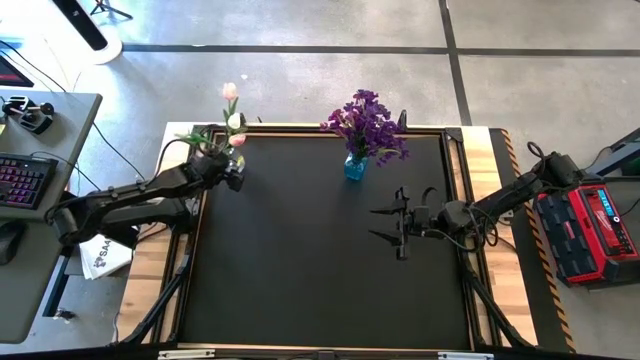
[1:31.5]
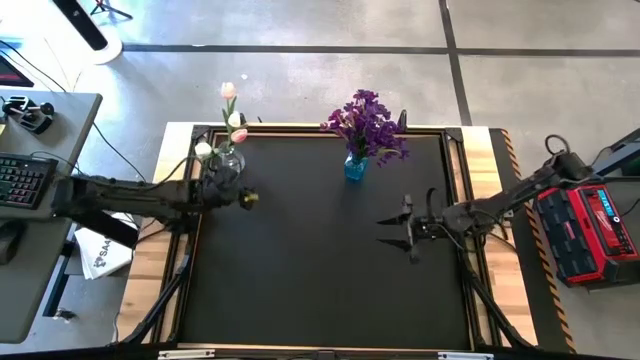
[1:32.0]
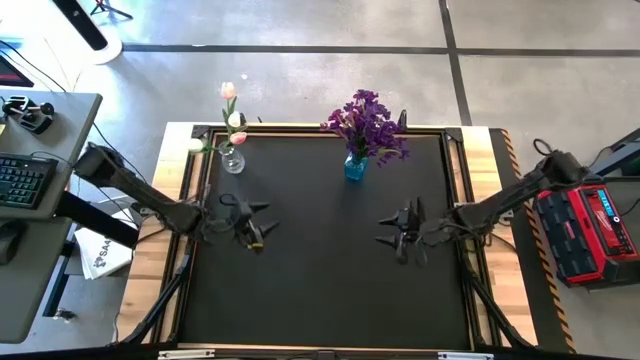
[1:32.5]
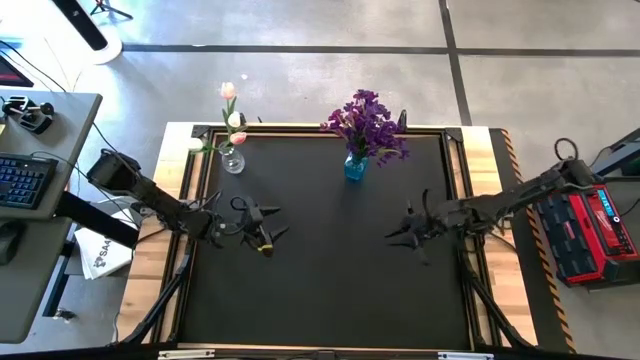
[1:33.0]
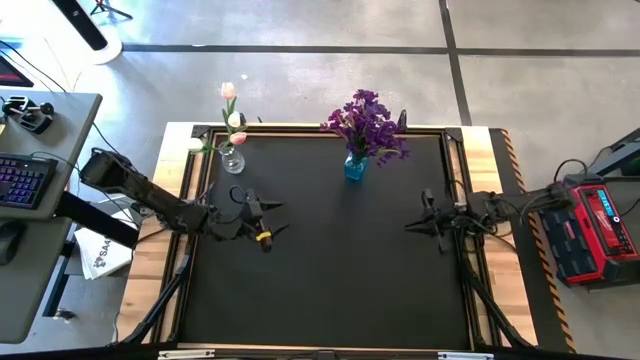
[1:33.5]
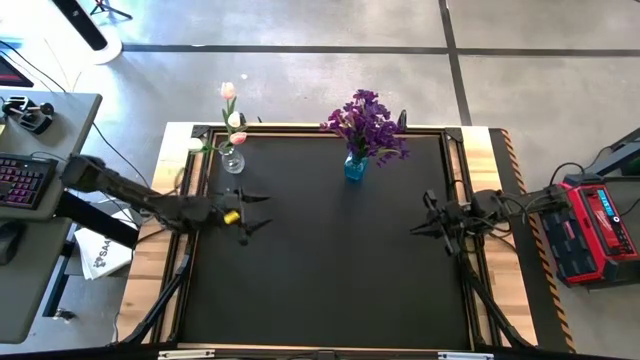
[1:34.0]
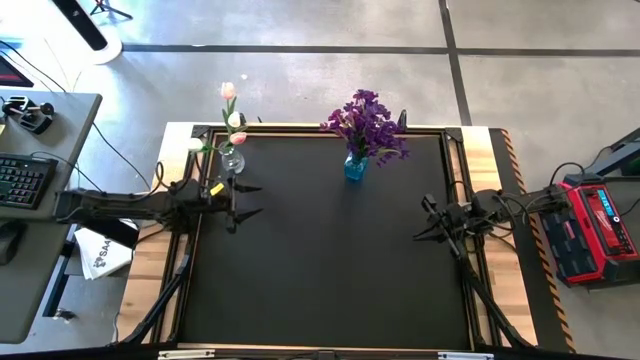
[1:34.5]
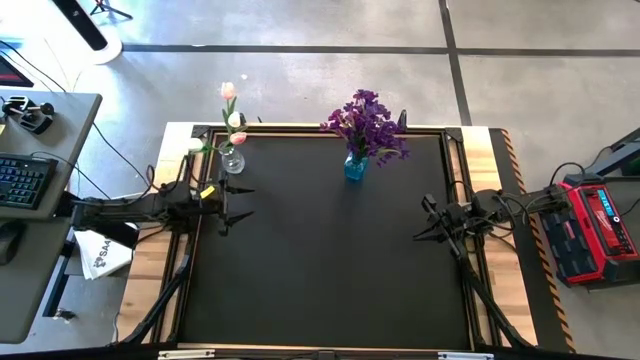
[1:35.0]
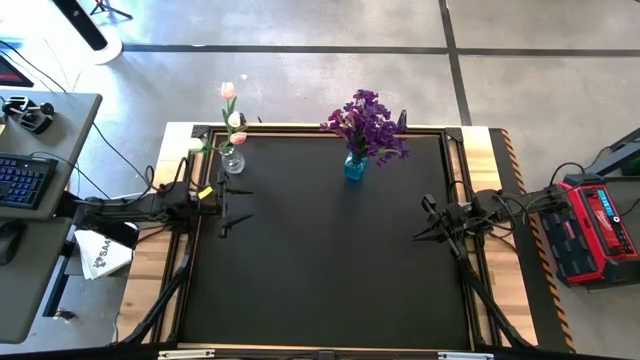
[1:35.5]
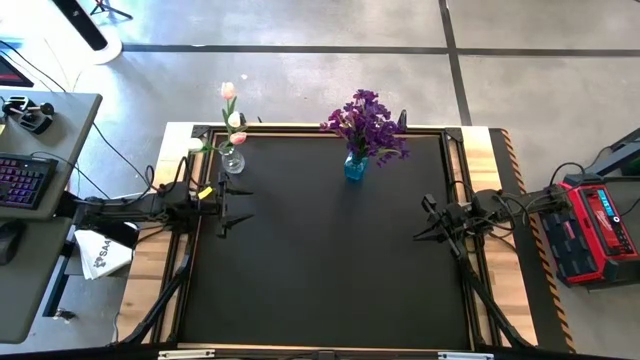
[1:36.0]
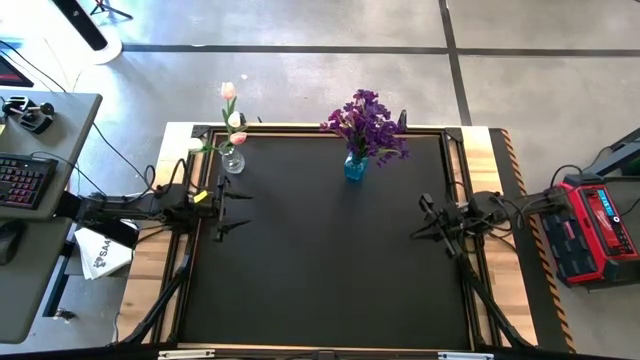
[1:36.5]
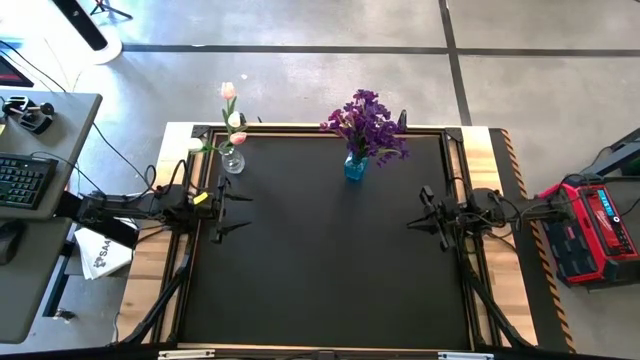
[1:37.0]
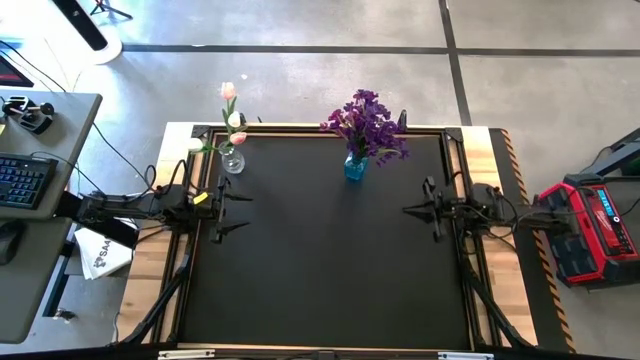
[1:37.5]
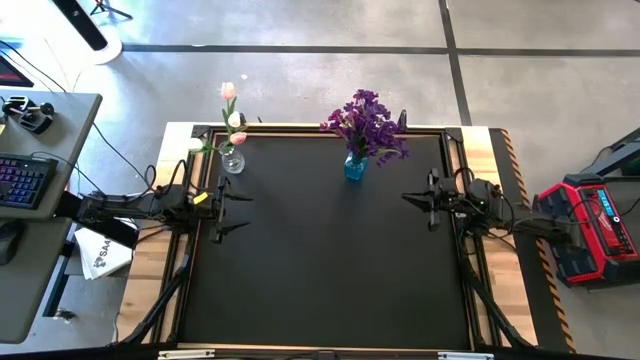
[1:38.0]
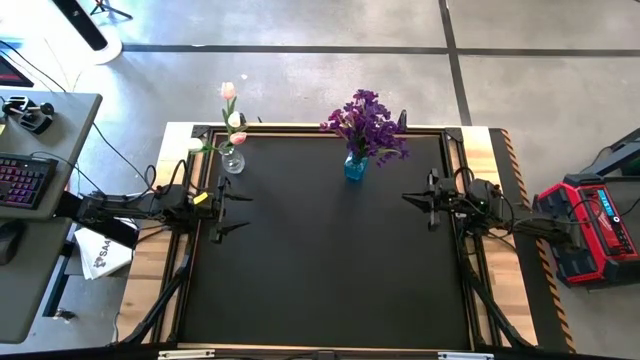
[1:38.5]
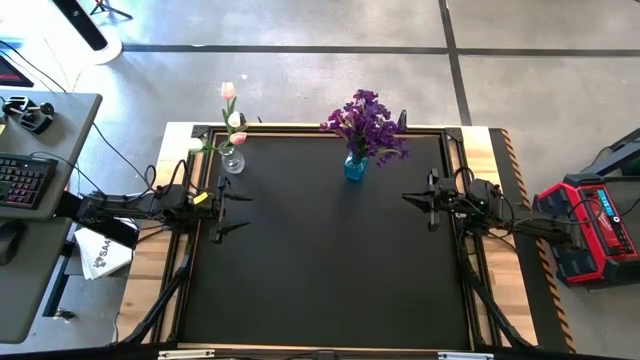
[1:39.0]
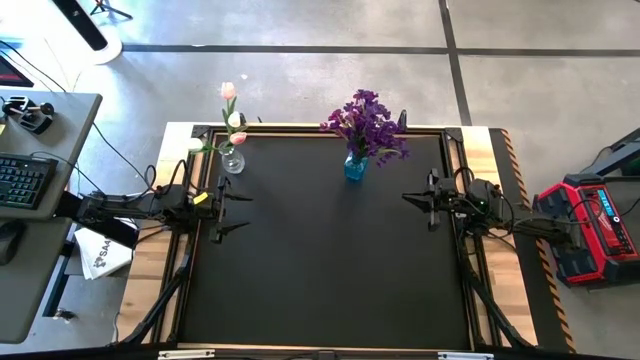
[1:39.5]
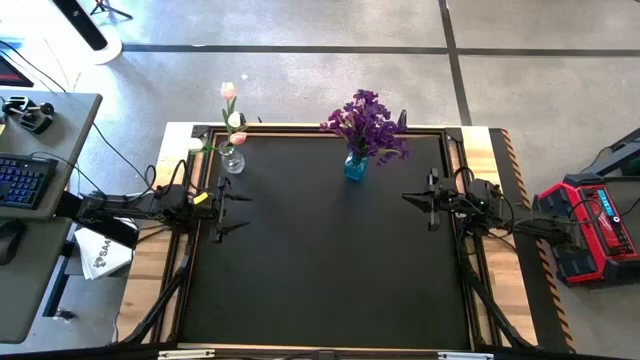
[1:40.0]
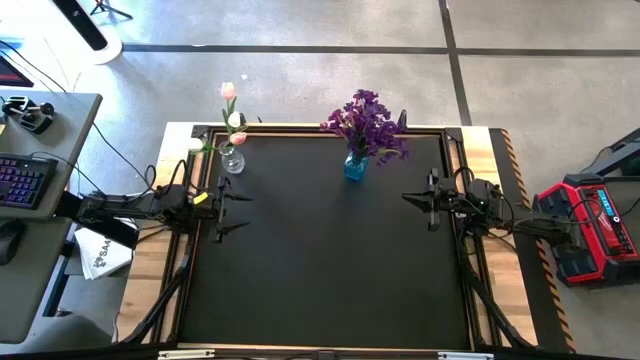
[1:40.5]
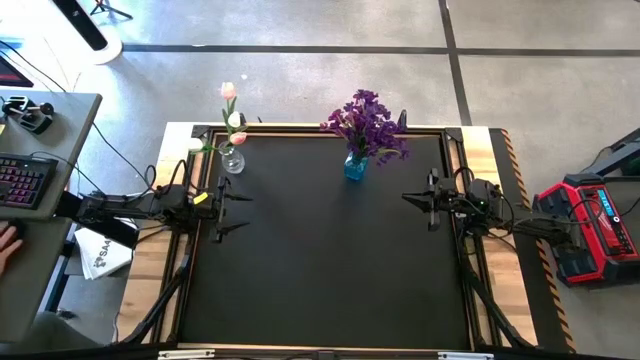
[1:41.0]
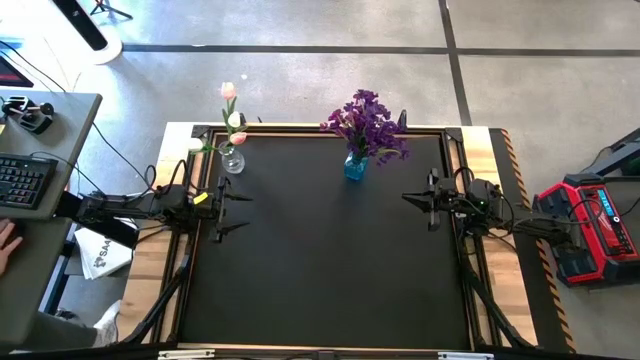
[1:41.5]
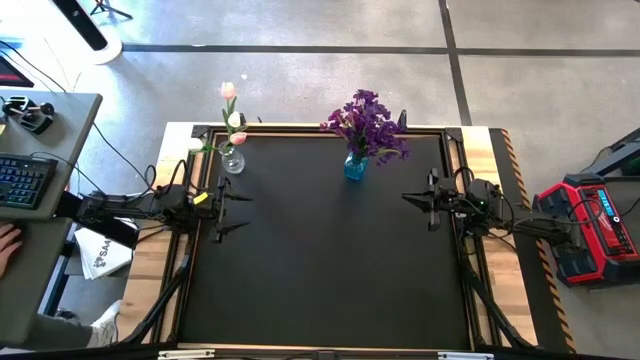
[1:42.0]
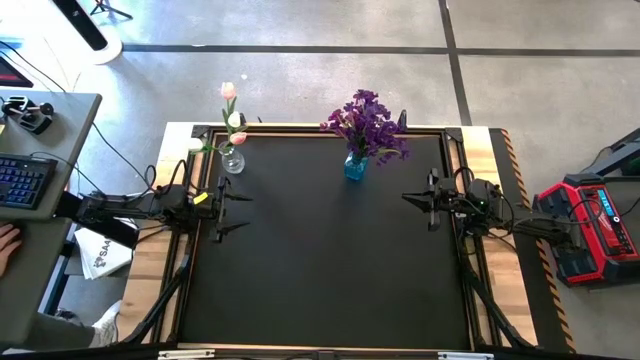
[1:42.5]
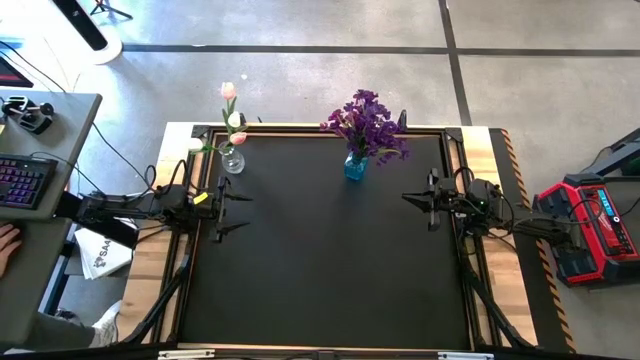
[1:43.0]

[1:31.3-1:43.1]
Task: Sort flowers into vase by color
Return to Home Position

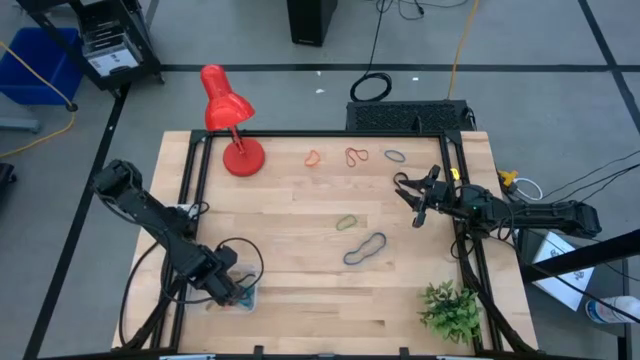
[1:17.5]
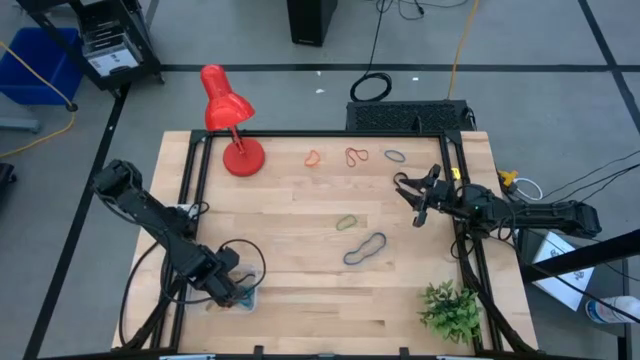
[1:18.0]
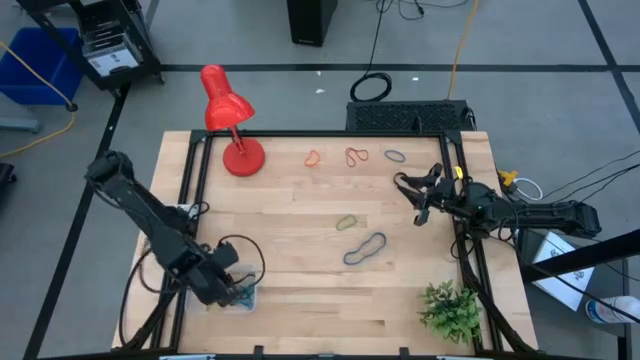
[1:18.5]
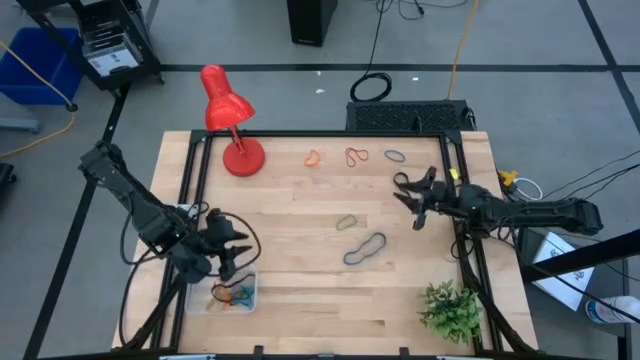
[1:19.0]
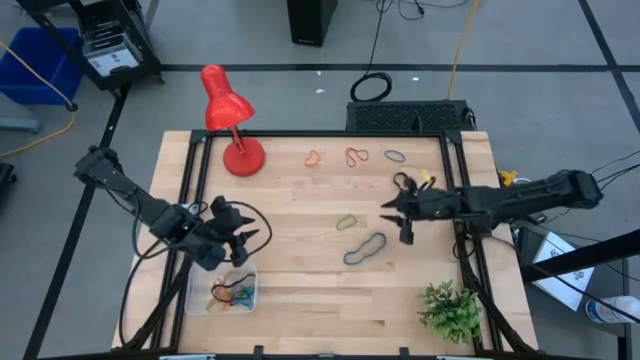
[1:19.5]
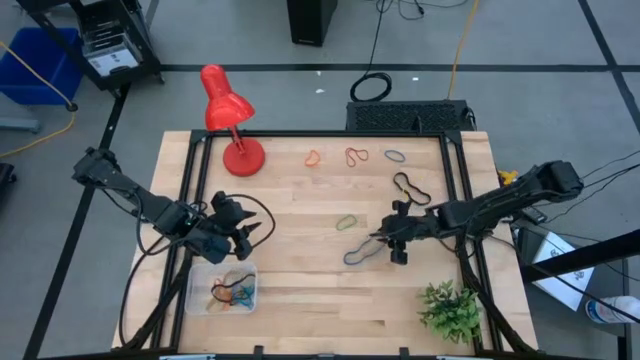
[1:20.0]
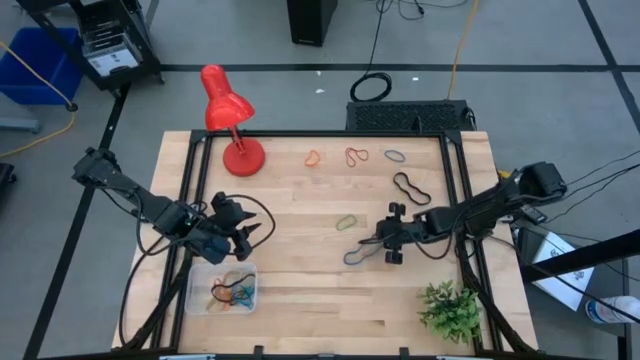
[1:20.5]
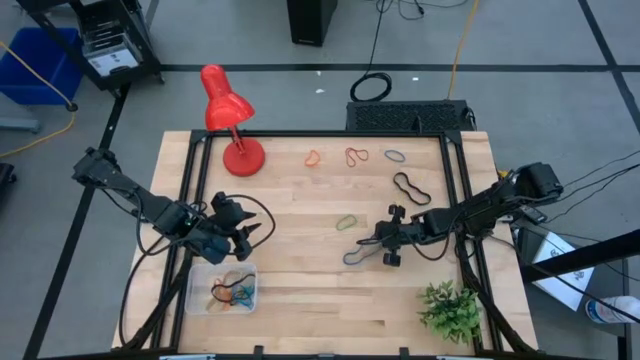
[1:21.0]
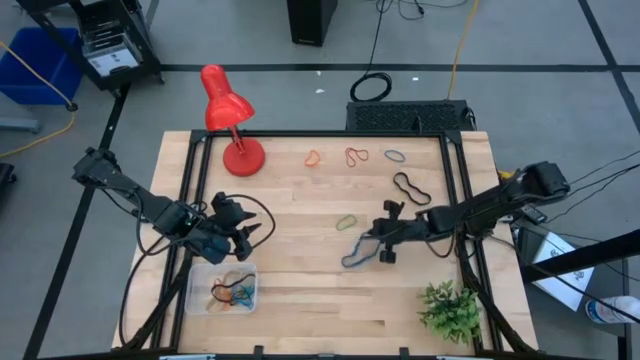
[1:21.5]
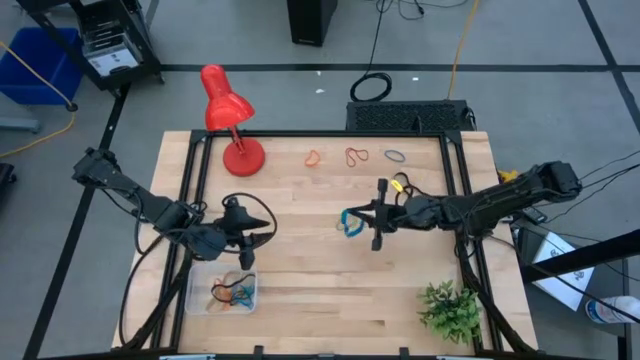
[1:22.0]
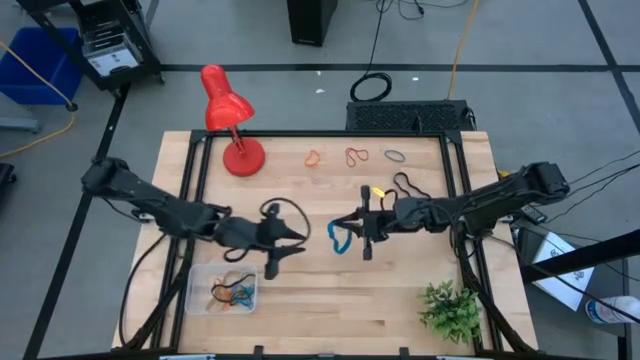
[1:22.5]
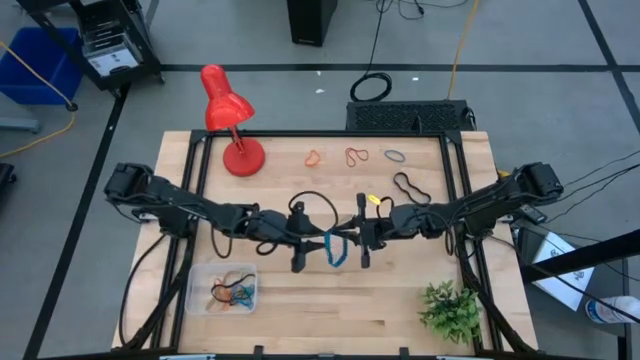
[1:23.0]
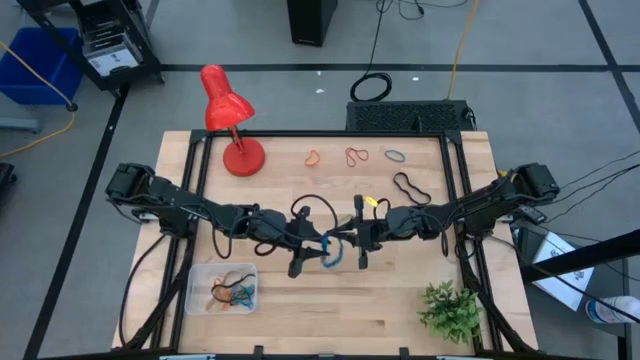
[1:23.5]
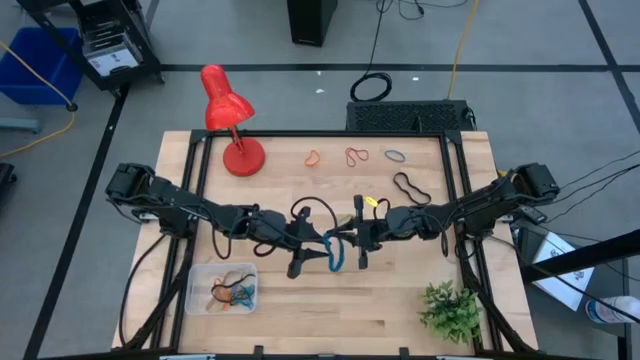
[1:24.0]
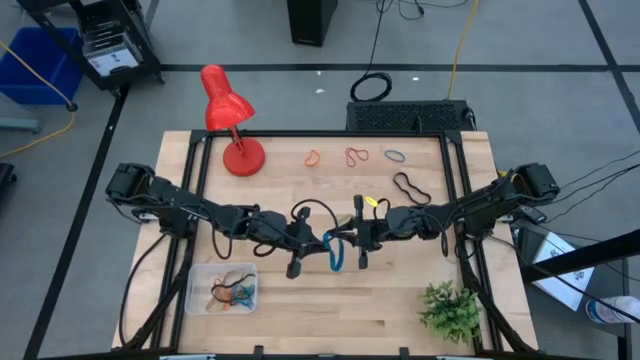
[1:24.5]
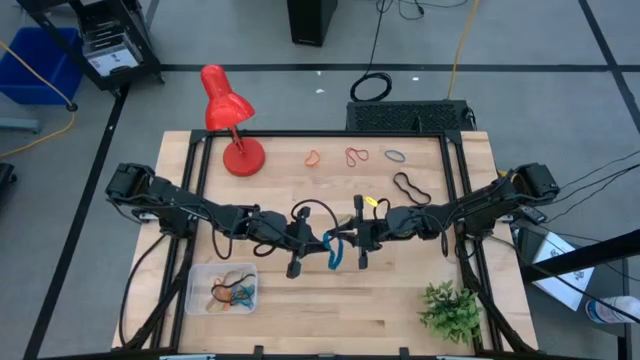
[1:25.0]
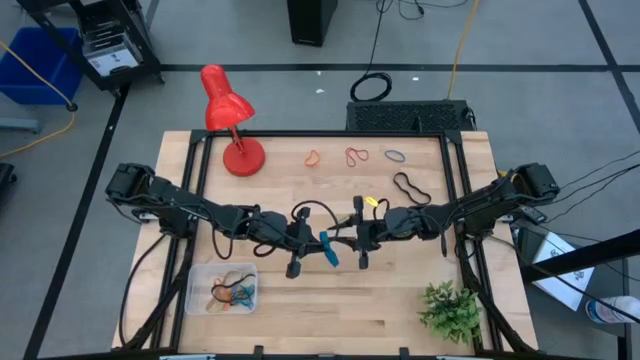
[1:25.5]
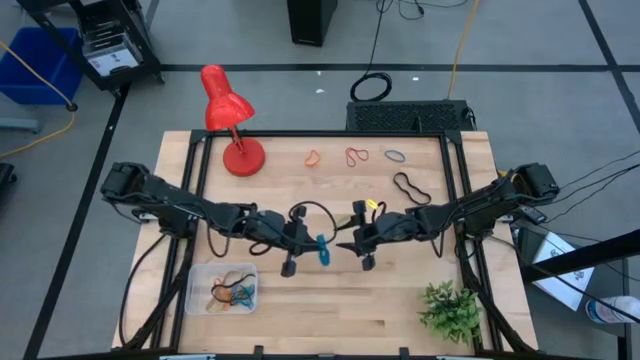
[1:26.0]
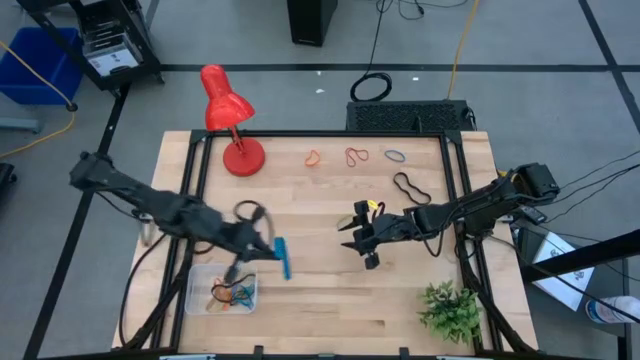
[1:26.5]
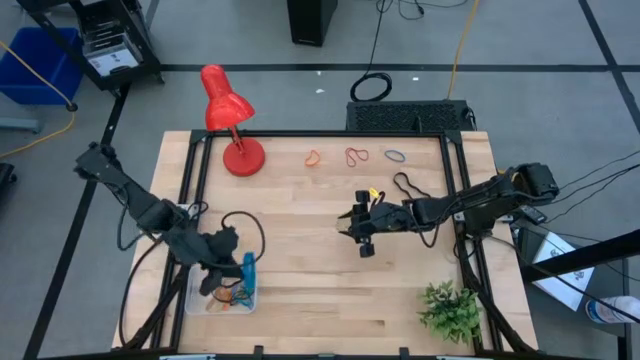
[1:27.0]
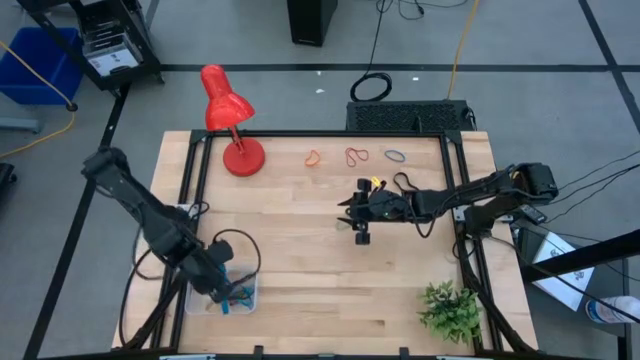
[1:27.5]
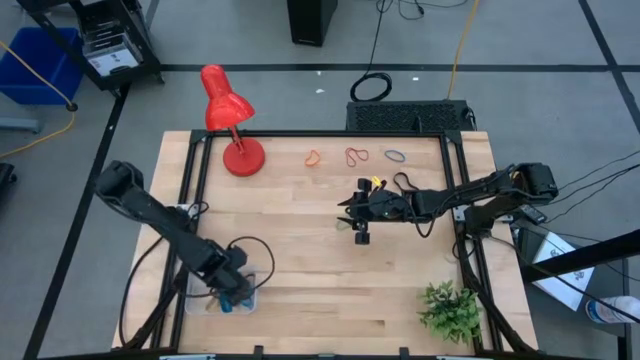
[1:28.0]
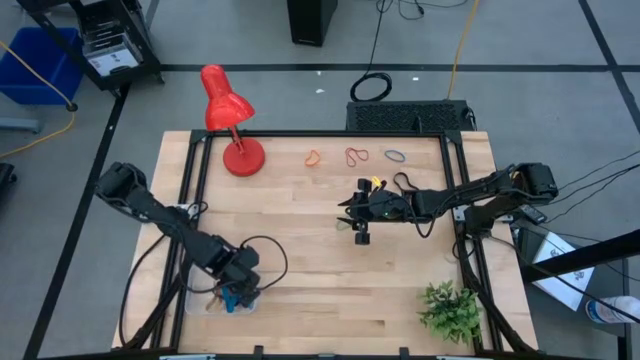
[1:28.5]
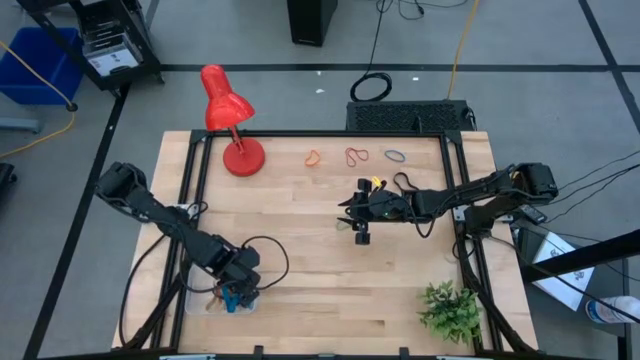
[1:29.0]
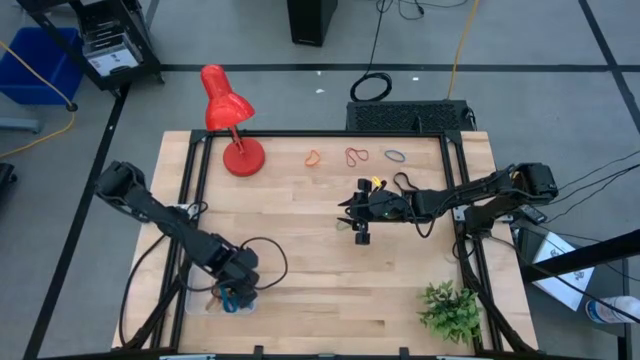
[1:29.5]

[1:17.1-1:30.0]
Task: Pick and place rubber bands into bin
Put the bottom blue rubber band into the transparent bin
